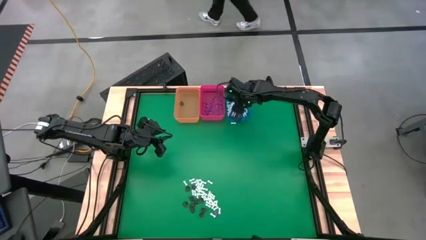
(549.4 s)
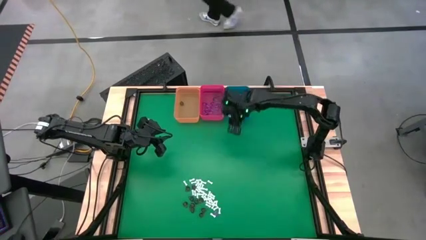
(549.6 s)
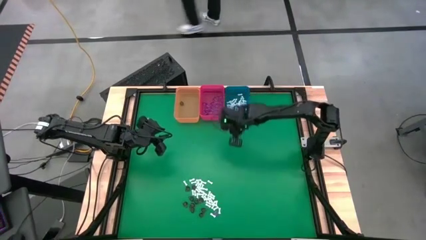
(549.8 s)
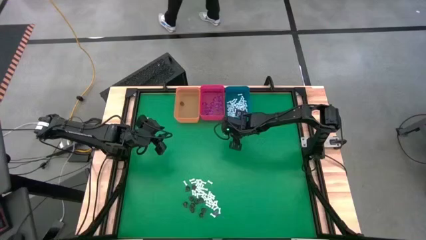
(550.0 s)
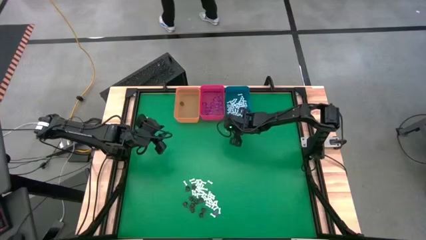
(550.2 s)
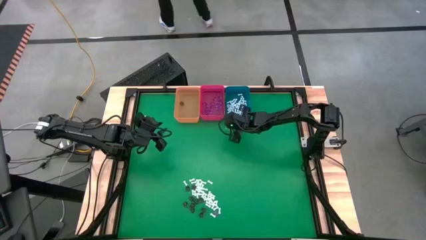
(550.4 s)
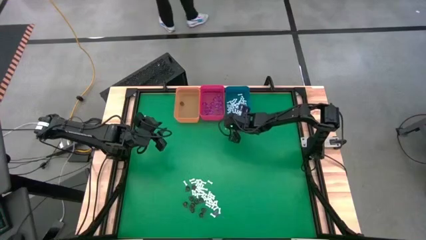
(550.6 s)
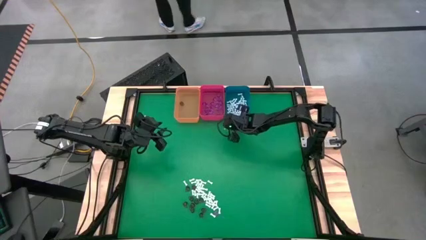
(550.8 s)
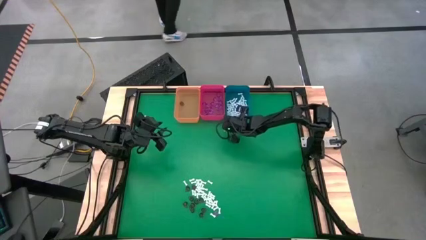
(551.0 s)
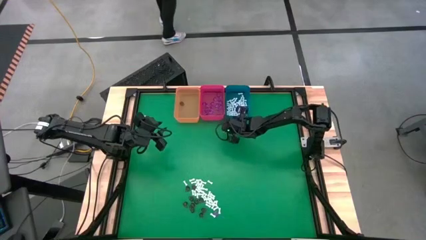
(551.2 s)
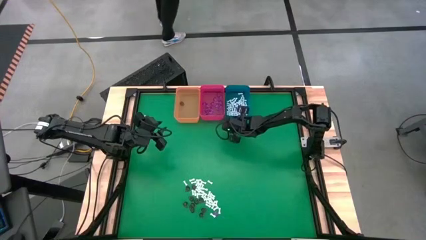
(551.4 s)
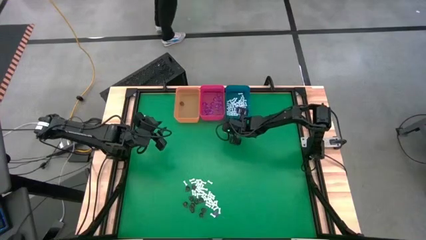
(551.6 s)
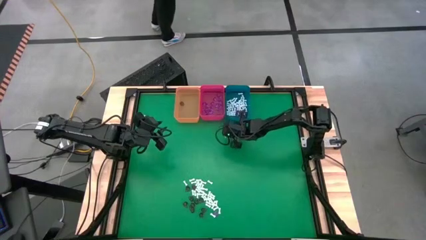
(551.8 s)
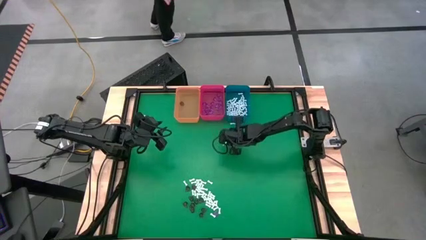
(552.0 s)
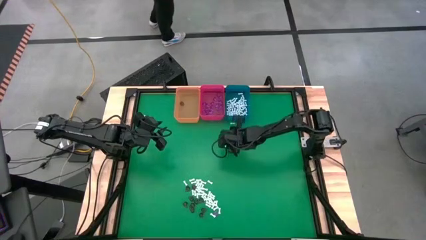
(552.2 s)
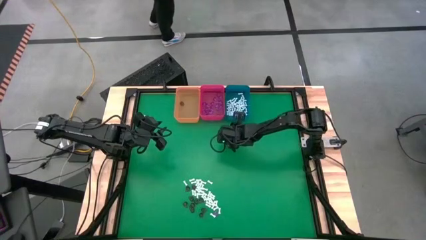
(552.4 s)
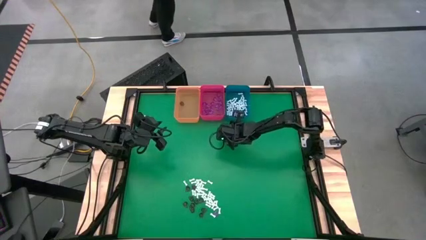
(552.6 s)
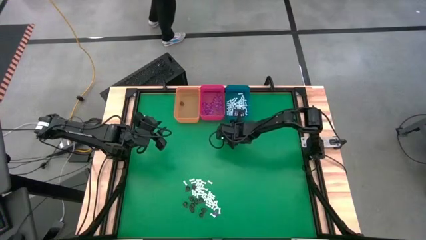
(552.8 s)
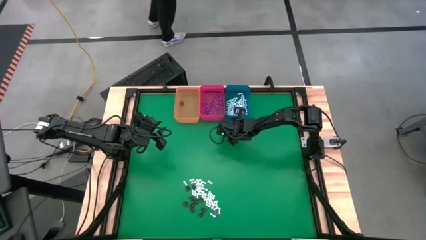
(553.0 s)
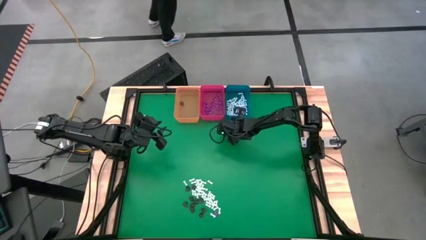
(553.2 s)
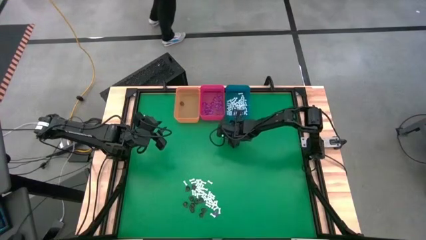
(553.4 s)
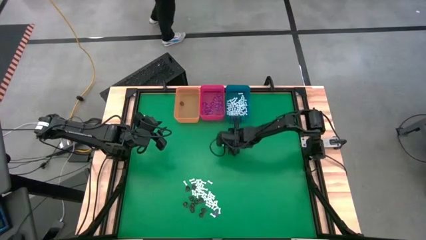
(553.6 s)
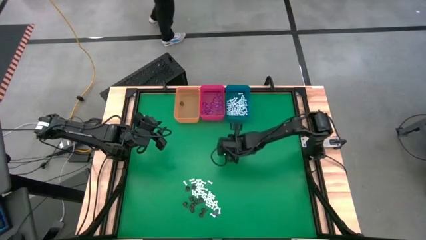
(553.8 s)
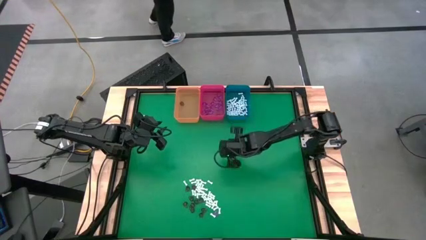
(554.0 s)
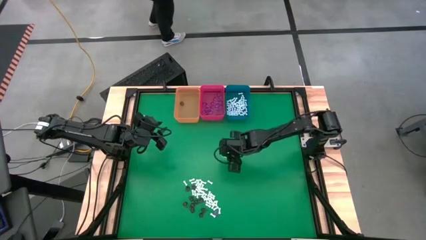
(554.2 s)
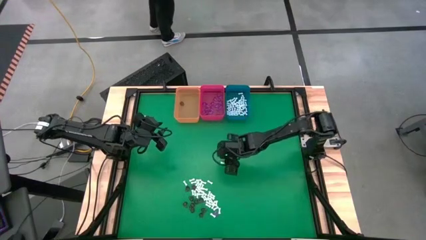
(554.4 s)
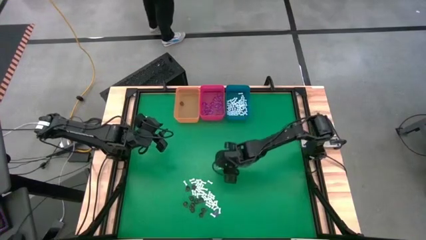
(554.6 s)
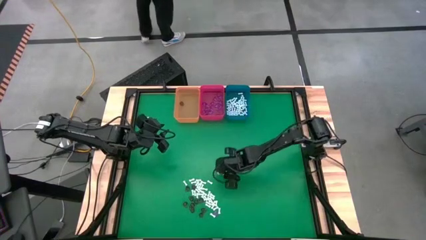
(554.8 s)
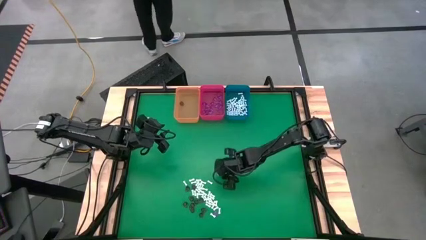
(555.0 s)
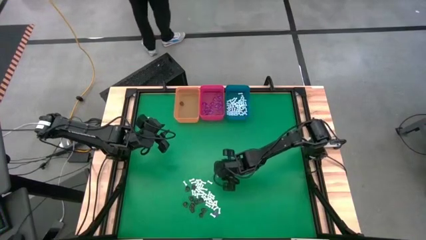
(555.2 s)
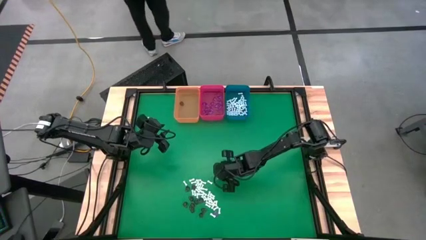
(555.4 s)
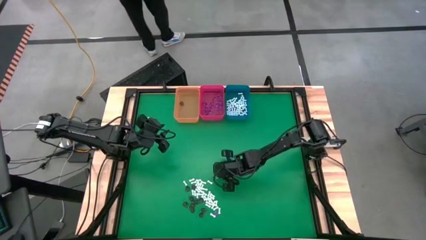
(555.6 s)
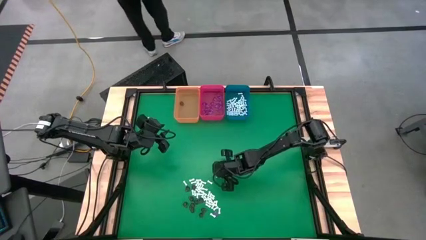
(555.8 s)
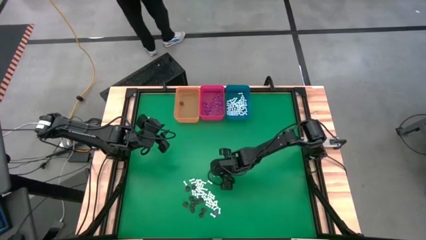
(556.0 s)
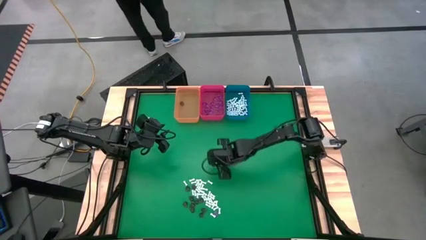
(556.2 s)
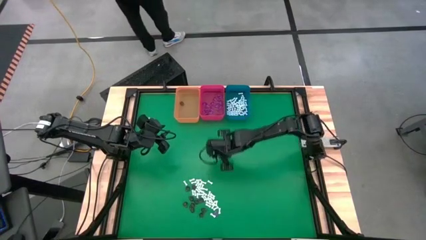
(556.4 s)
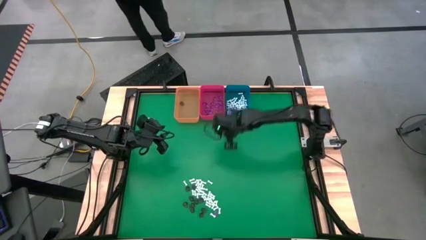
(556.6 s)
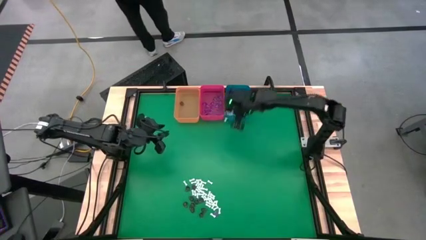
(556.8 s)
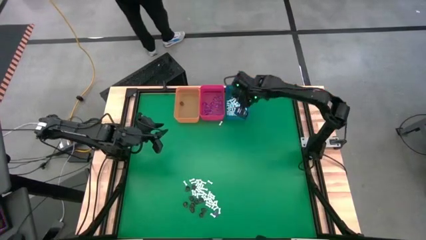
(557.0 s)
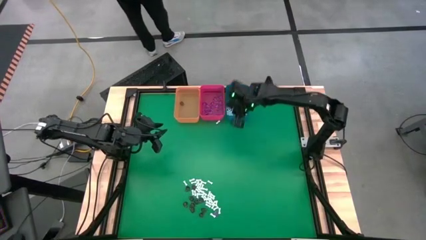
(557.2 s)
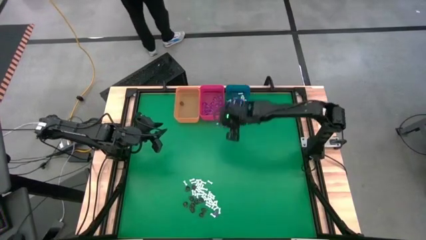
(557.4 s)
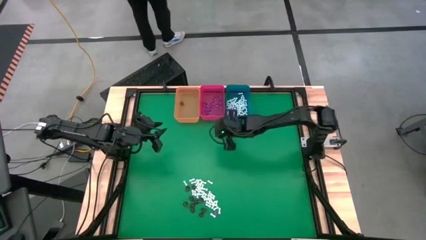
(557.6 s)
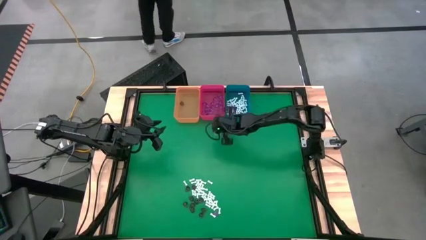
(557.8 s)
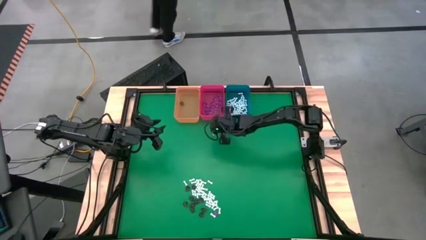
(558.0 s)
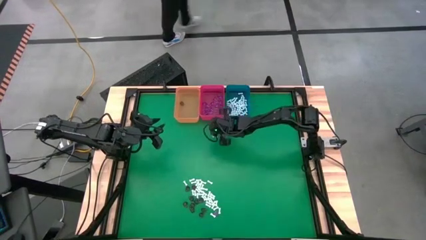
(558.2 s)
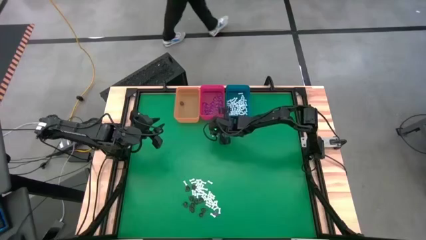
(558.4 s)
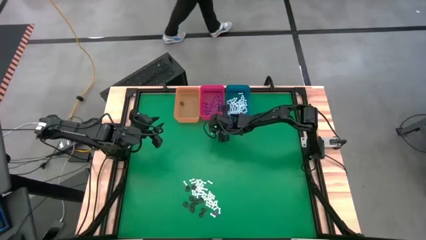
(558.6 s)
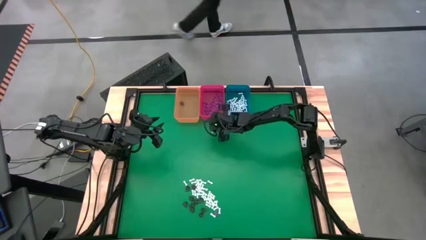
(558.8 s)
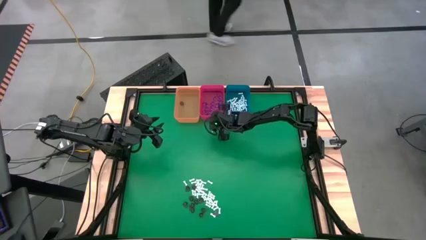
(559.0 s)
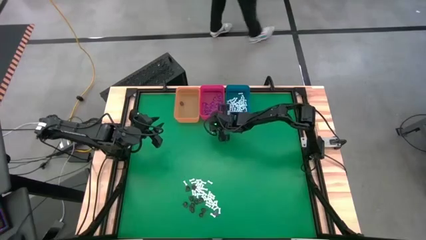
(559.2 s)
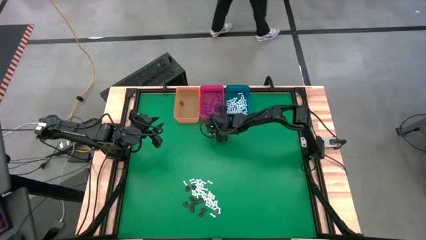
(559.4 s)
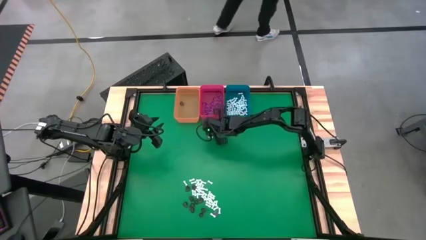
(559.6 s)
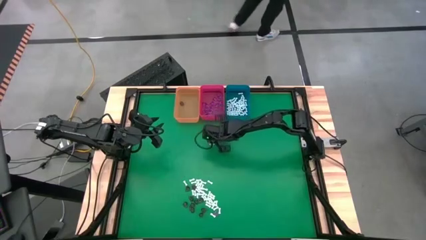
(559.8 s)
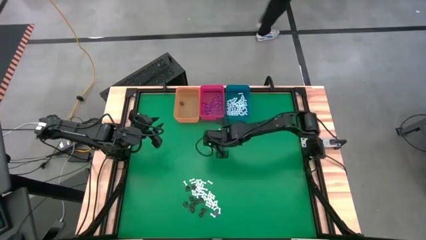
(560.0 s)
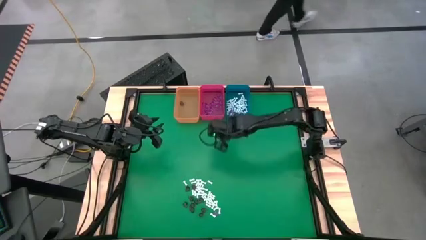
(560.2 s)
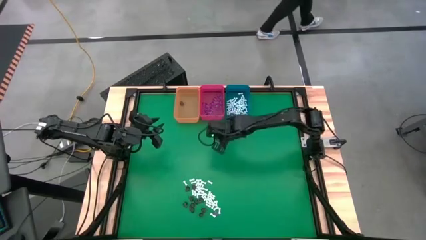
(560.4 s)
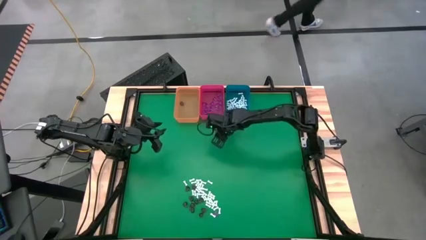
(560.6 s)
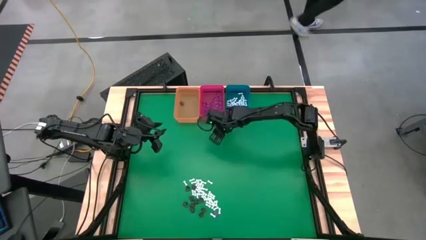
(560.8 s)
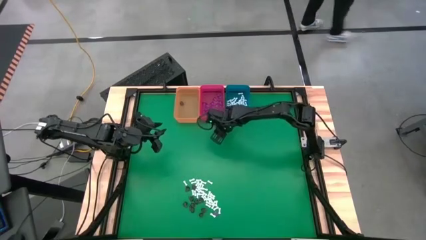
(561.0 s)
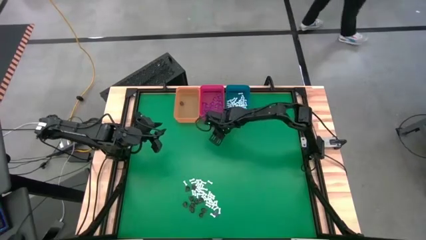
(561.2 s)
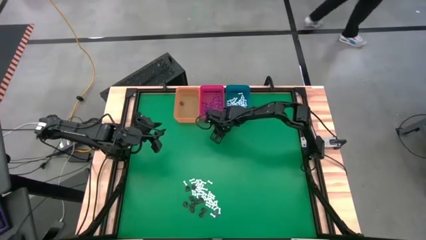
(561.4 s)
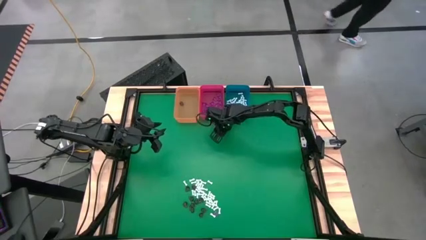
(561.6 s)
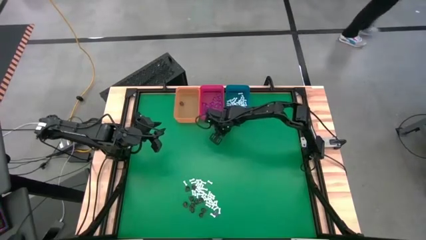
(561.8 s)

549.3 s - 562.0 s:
Task: Sort Halloween decoration
Put the white bone toy into the blue bin

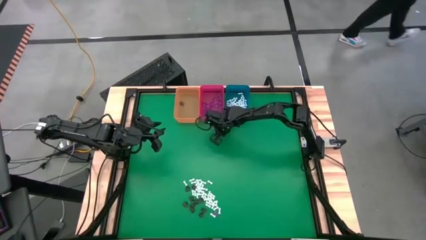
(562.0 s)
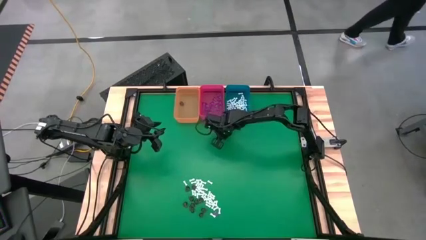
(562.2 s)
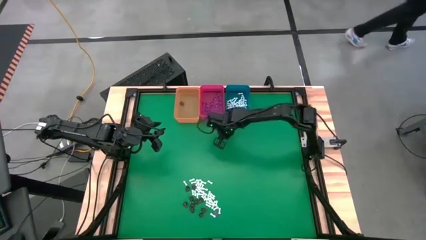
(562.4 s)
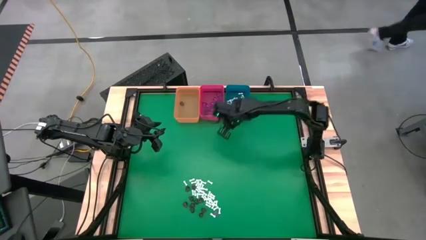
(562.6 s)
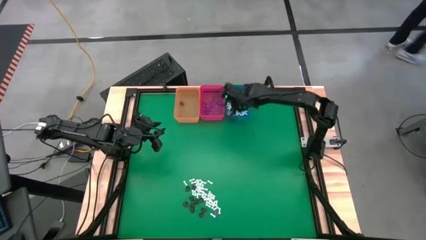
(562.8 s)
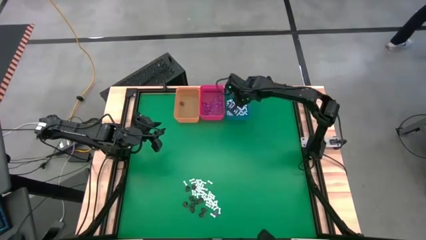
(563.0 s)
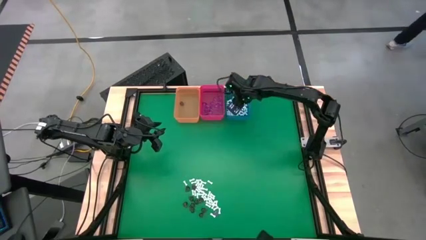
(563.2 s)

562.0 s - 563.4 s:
Put the white bone toy into the blue bin

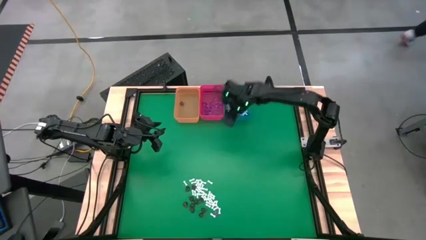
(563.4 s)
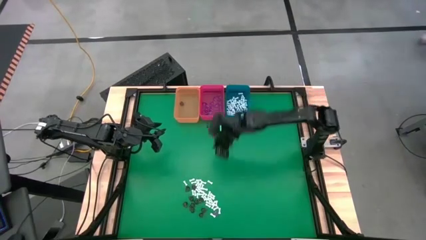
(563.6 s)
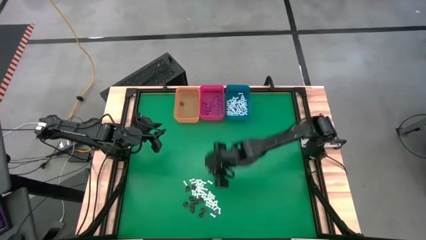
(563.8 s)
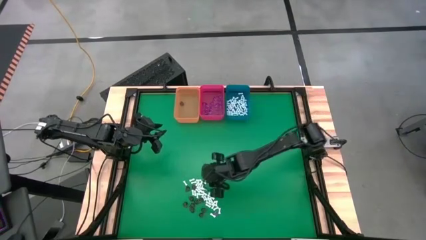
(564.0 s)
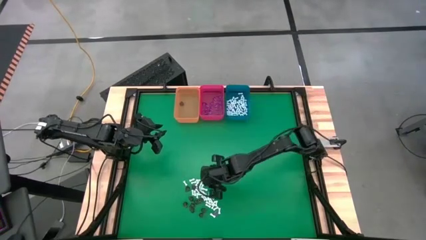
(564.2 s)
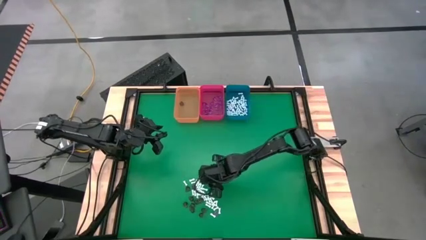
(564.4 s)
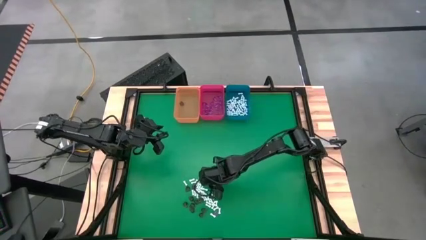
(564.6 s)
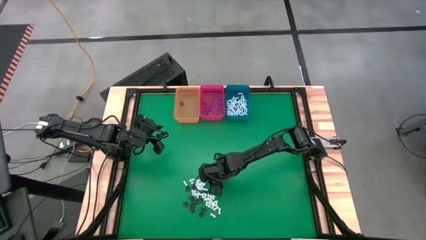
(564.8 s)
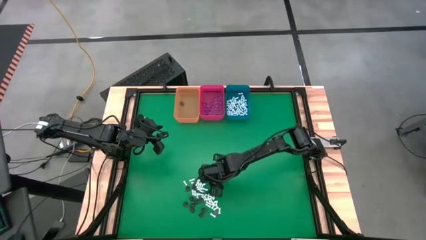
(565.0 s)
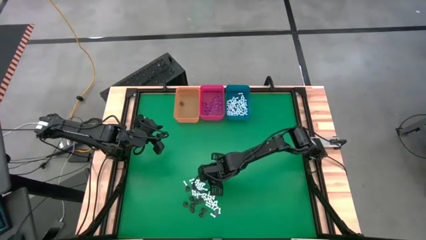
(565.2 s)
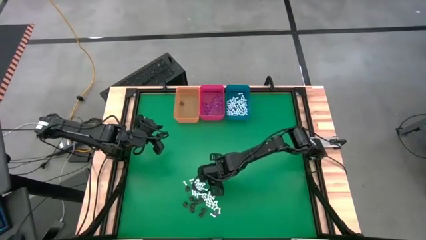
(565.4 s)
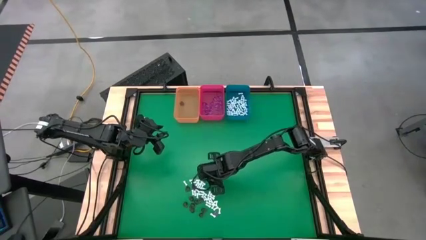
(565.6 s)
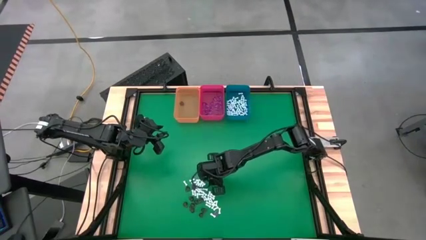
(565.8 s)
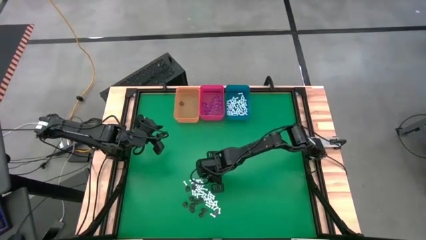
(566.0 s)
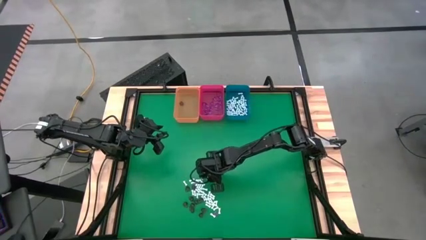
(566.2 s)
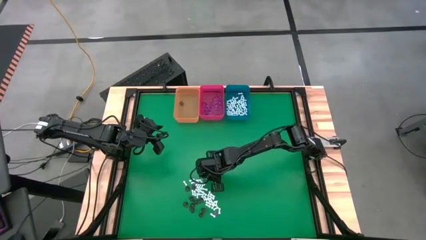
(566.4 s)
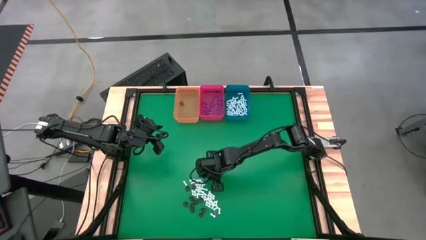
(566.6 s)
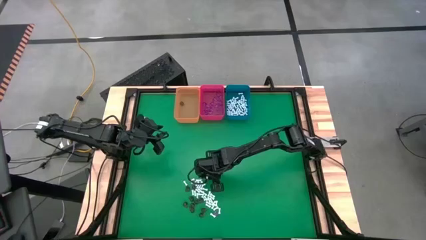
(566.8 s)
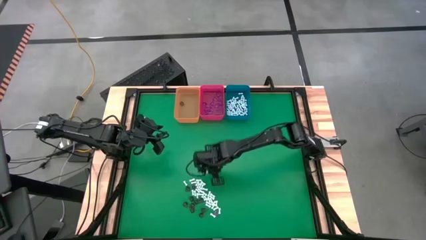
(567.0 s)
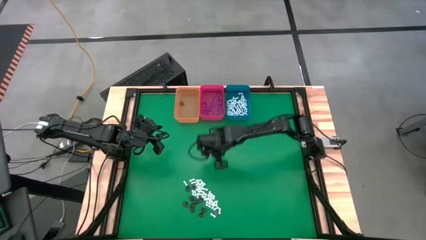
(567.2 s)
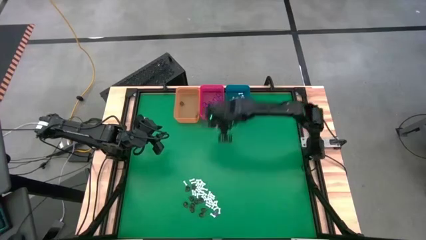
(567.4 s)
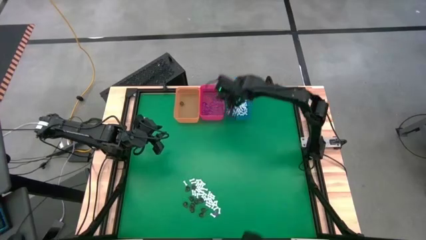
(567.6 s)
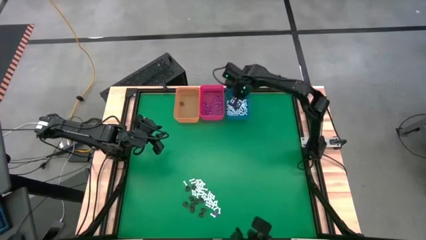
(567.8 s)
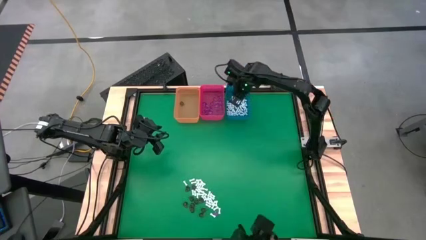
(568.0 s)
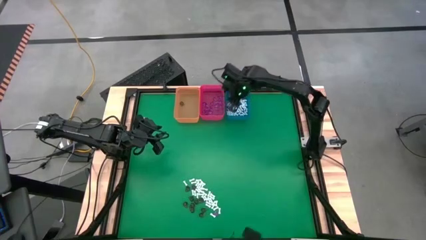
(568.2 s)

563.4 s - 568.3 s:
Put the white bone toy into the blue bin
